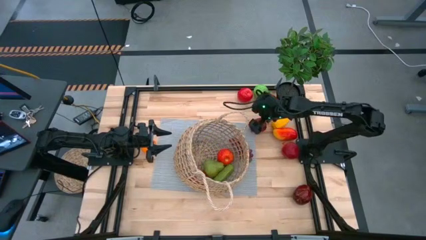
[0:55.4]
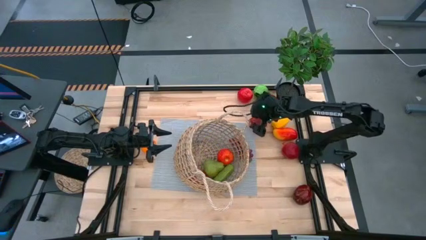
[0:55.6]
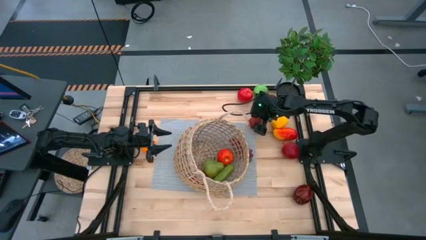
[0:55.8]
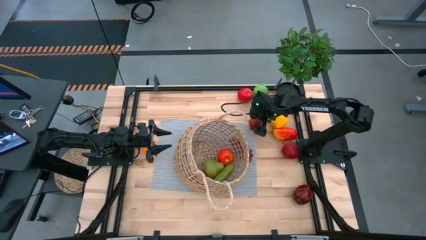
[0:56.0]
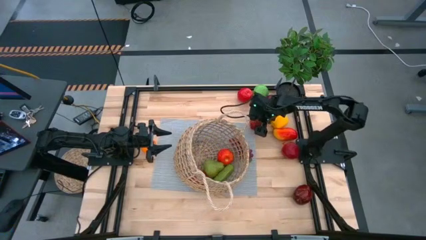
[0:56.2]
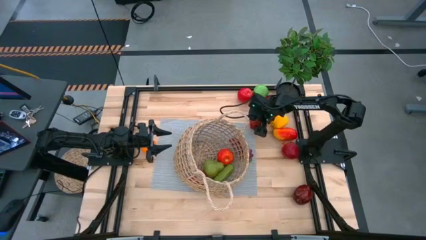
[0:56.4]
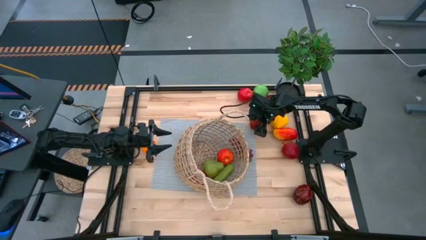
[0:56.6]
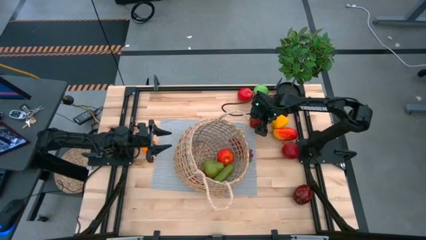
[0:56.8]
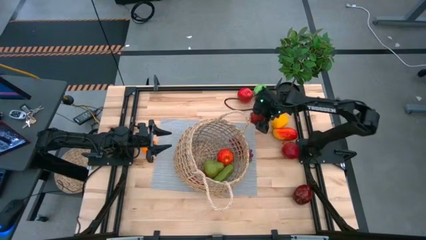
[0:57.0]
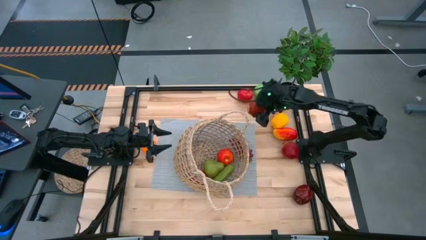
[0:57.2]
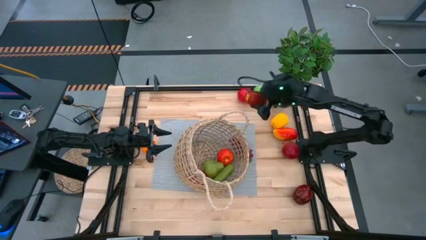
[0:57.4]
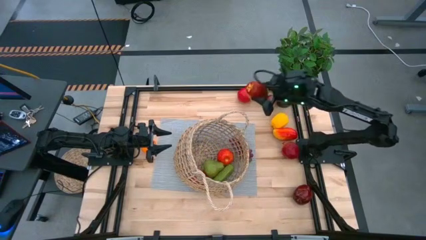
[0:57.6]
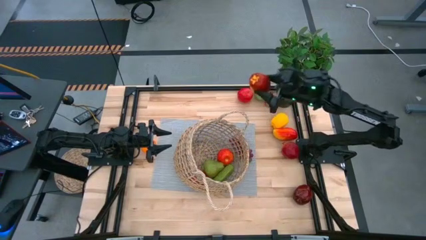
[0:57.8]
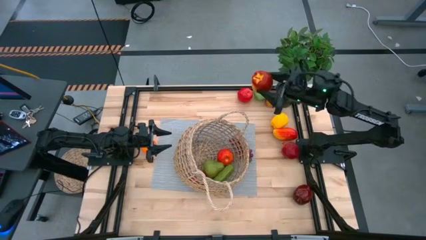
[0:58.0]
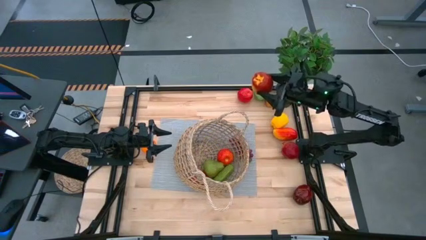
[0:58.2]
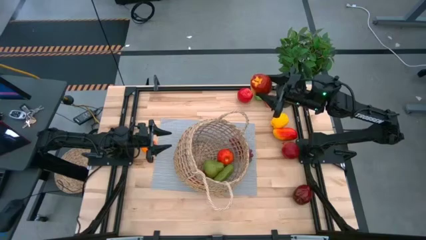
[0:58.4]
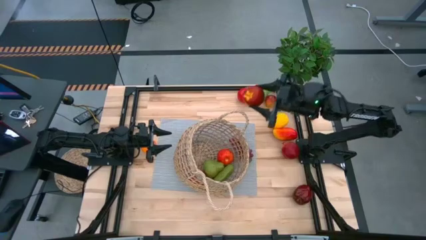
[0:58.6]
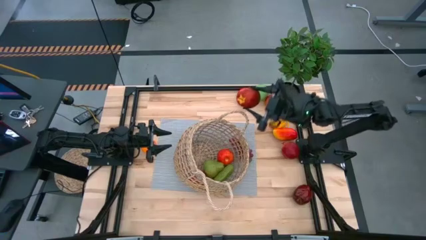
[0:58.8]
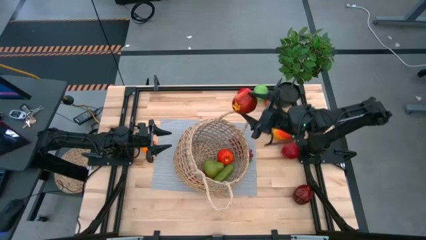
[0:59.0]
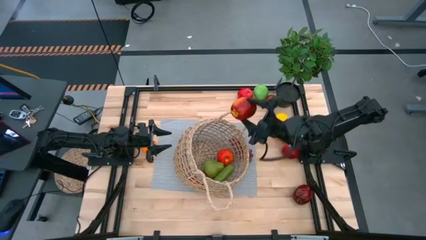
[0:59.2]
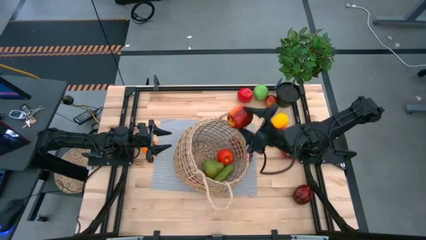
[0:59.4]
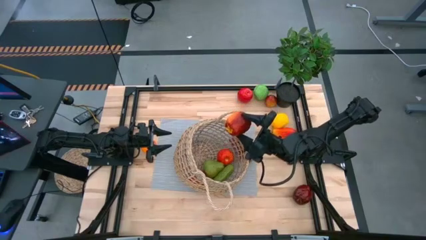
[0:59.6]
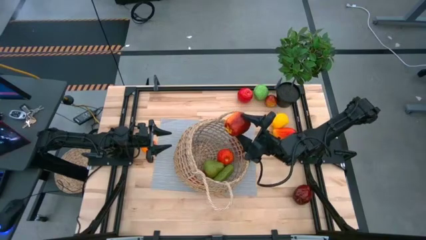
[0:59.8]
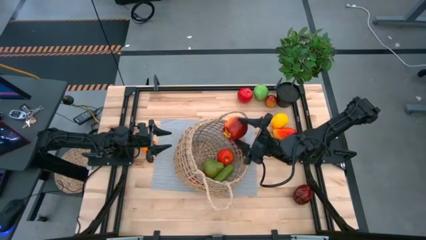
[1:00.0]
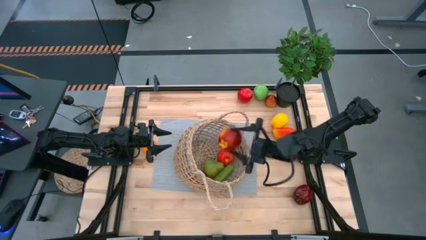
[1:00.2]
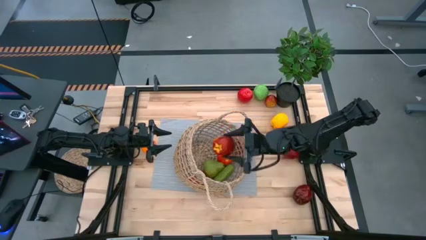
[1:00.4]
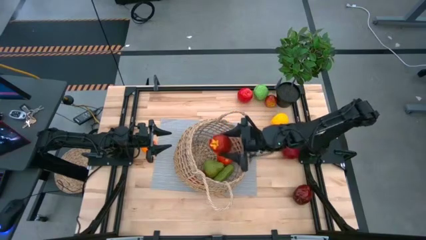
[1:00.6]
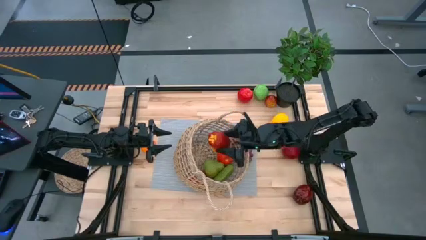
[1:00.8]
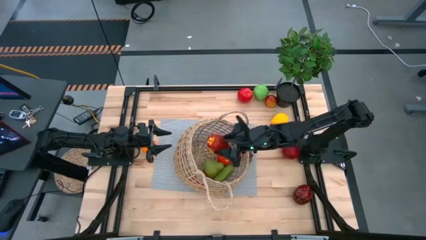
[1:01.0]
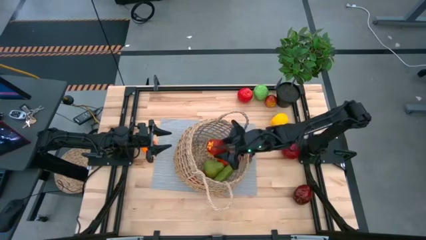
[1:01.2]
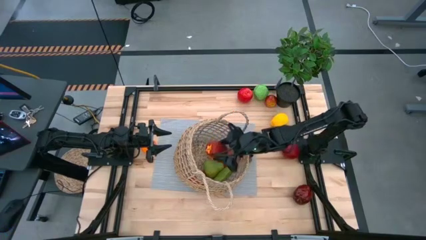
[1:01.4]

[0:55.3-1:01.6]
Task: Build produce basket
Put the apple into the basket

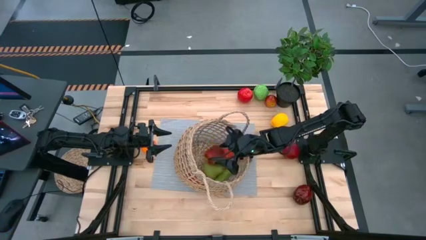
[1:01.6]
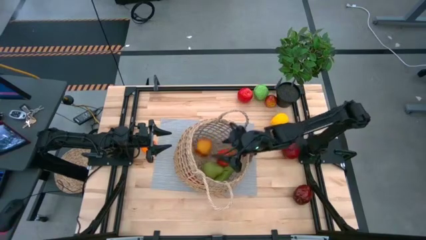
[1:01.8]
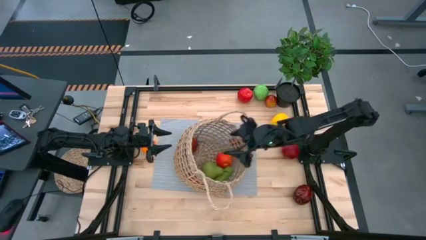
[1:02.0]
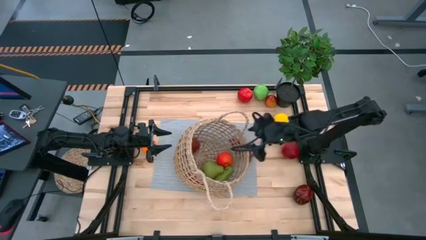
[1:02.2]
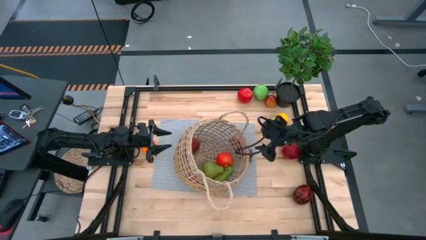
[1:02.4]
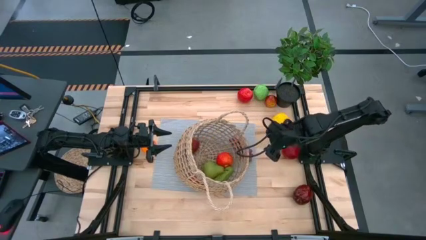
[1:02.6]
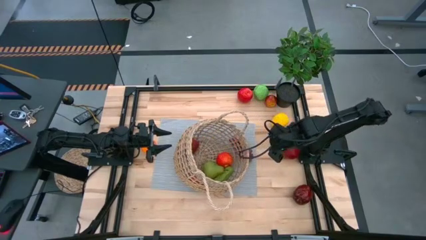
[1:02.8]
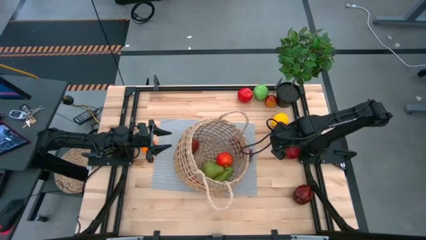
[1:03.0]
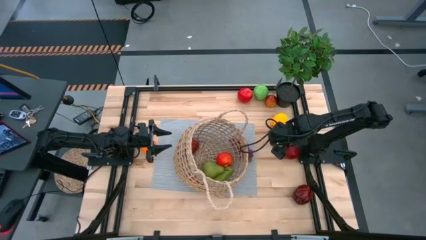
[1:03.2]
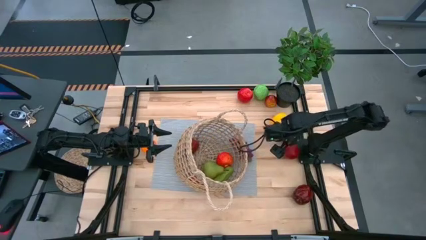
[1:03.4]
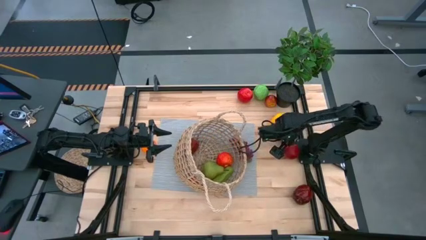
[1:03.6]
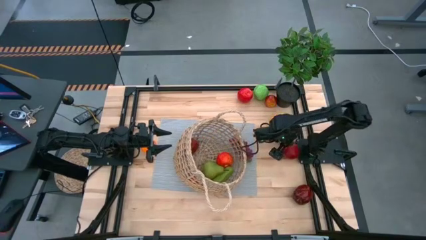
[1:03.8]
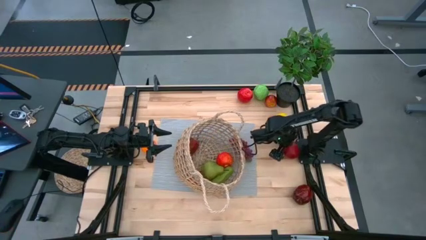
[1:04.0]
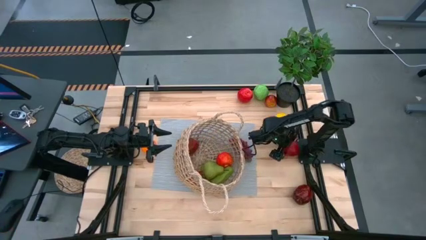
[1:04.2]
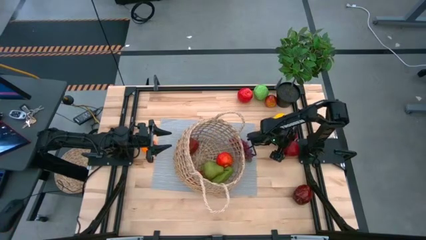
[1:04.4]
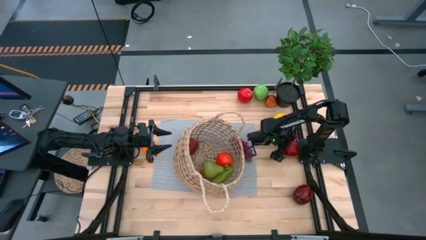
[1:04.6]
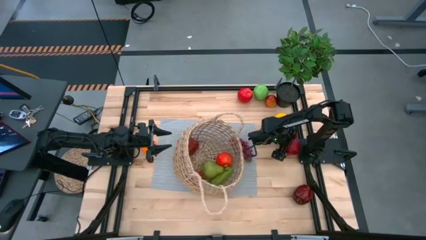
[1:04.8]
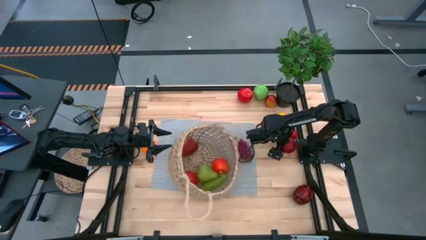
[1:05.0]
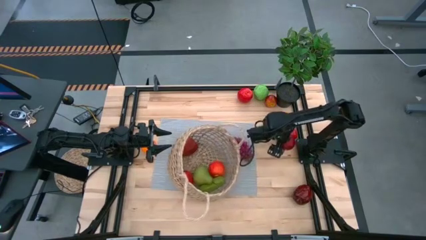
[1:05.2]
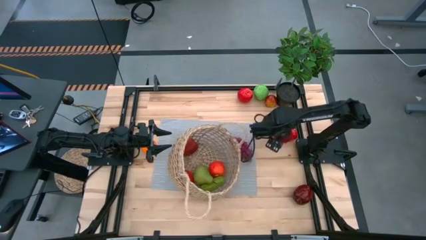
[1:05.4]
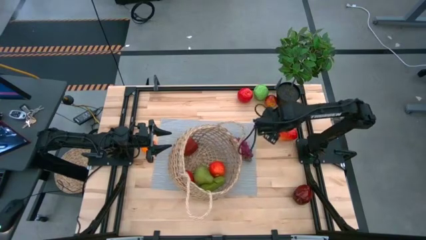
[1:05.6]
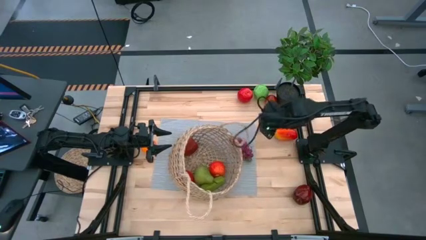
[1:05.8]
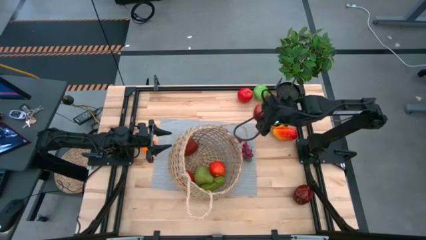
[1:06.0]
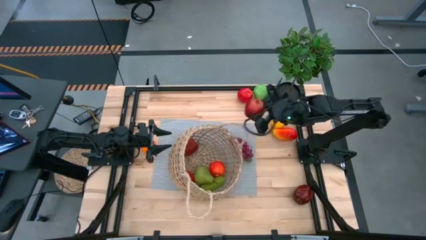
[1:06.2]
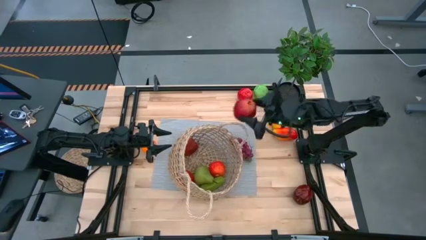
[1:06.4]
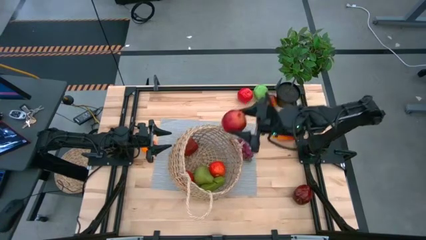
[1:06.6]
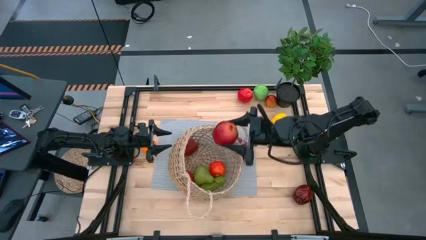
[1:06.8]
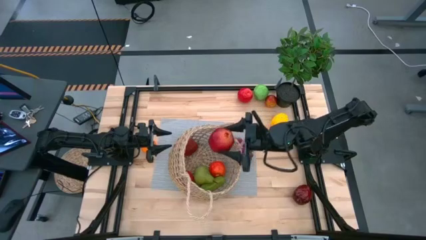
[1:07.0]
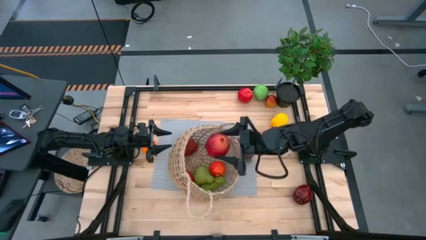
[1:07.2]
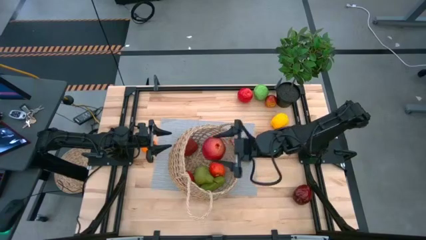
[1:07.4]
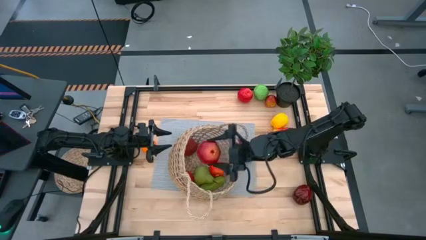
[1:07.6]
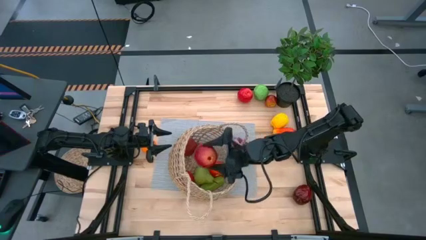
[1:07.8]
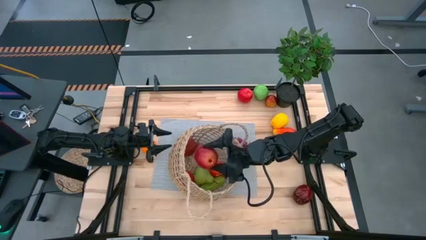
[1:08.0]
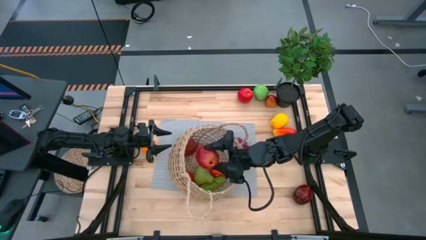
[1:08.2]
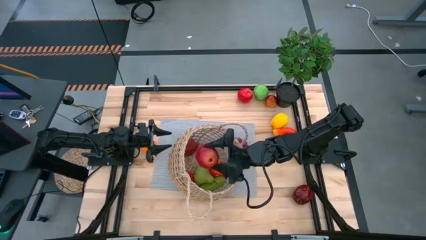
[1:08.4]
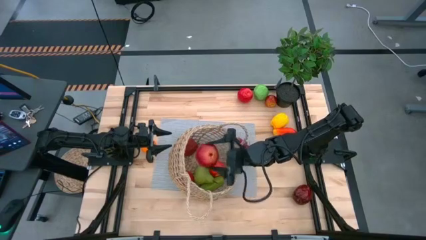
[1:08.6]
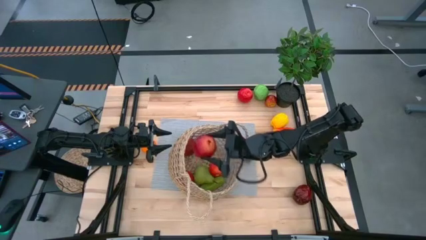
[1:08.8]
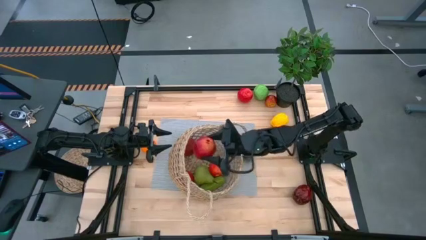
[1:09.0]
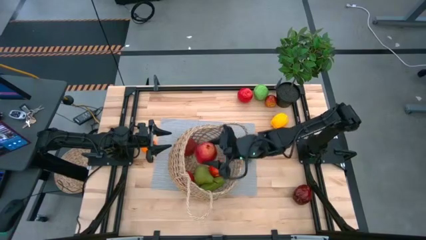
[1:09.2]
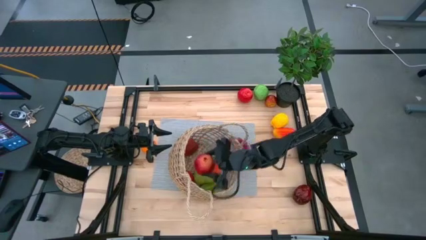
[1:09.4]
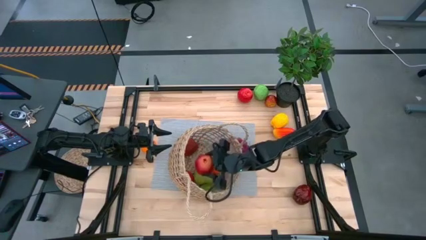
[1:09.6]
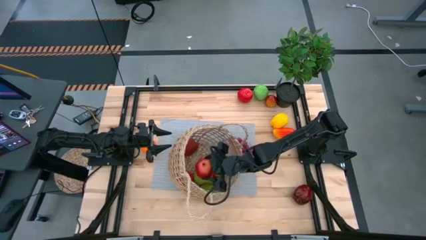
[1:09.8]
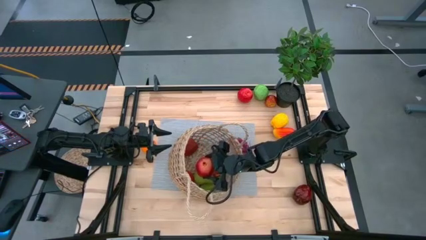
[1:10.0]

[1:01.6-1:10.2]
Put the pomegranate into the basket

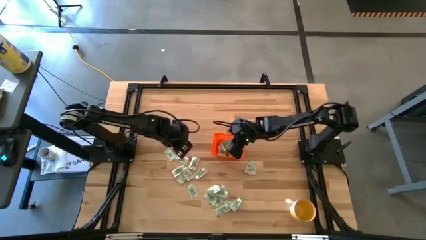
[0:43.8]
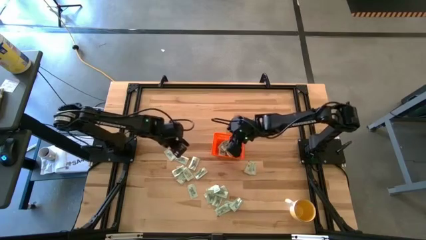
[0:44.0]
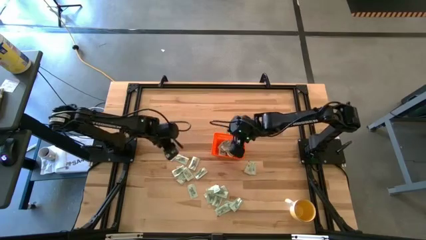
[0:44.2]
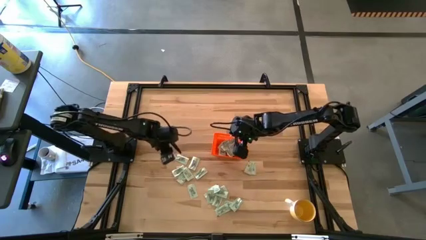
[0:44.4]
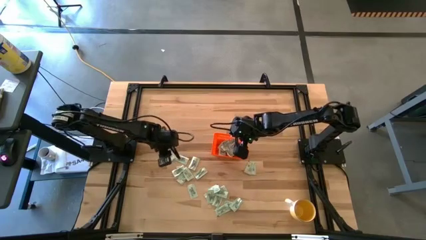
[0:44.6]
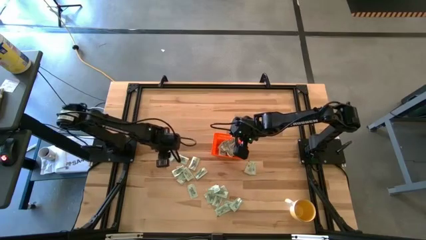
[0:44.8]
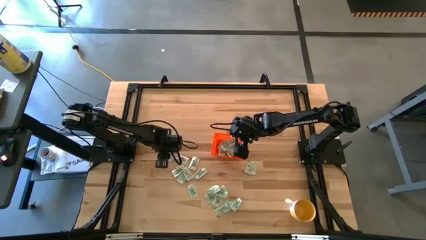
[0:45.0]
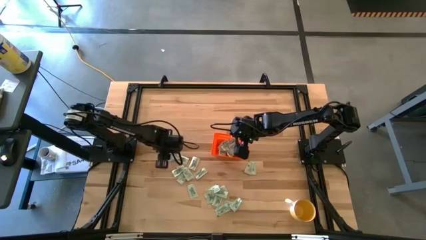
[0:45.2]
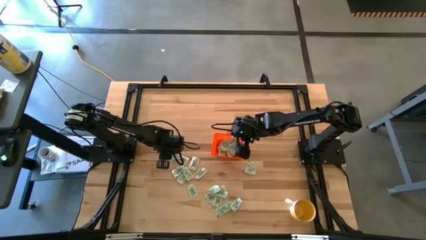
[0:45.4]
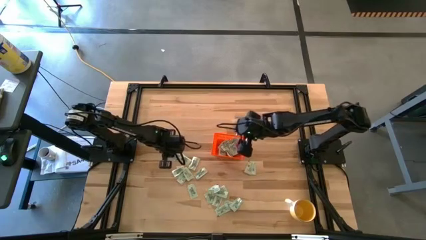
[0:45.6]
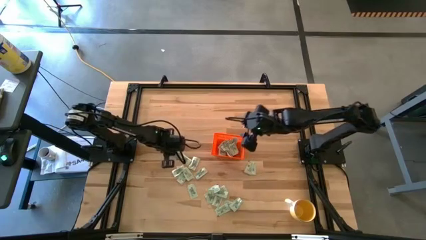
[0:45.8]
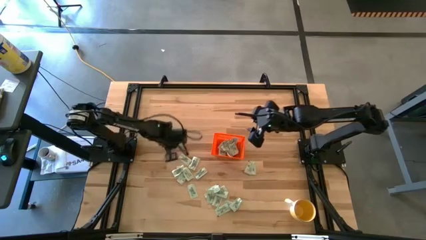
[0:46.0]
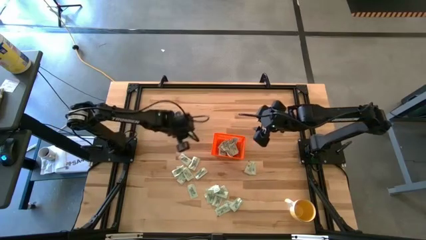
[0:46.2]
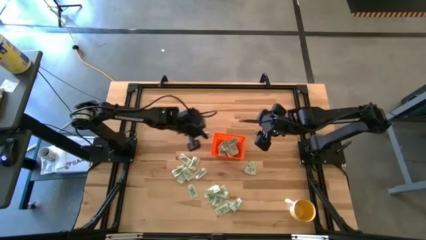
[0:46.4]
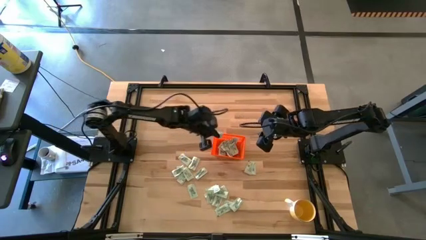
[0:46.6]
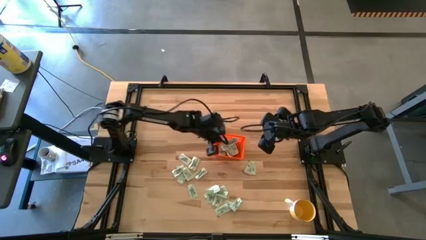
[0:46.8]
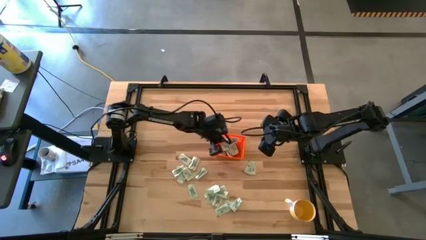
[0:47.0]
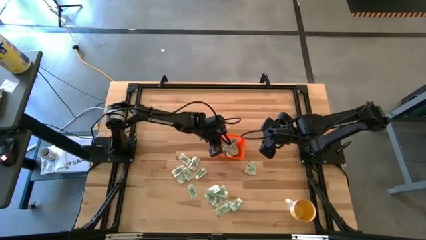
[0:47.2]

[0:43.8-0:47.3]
Task: Pick and place Stevia / Truvia into bins
Put the white stevia packet into the orange bin
